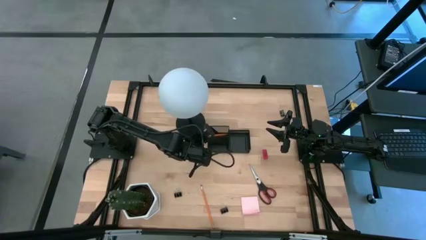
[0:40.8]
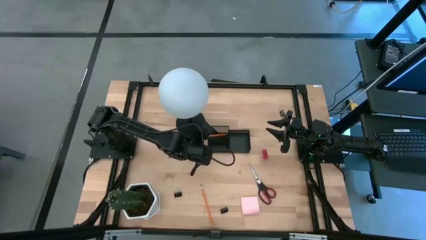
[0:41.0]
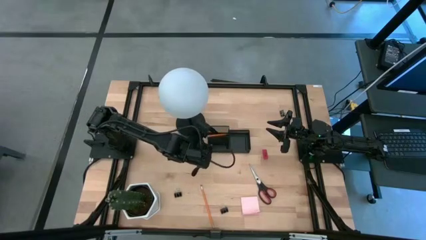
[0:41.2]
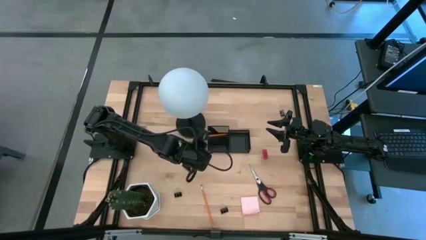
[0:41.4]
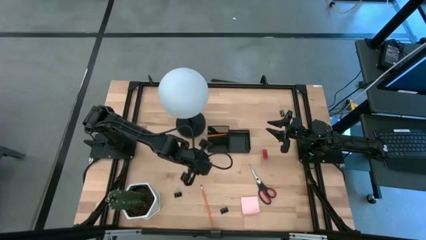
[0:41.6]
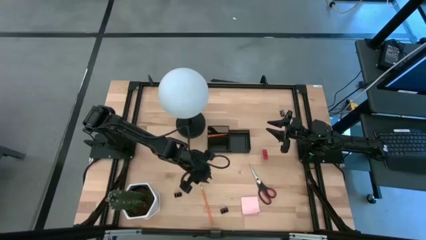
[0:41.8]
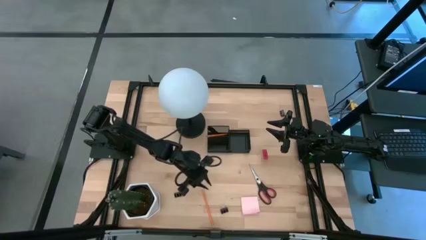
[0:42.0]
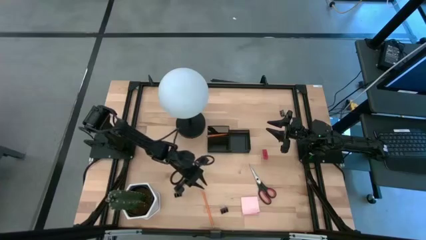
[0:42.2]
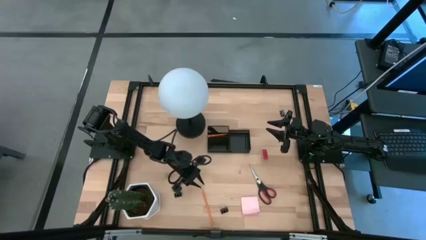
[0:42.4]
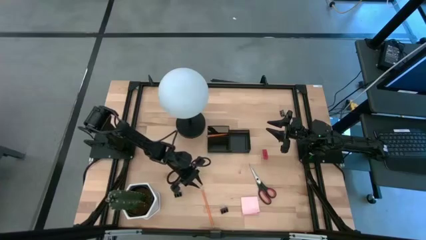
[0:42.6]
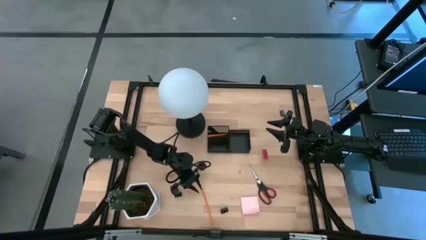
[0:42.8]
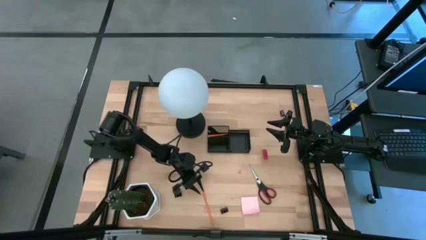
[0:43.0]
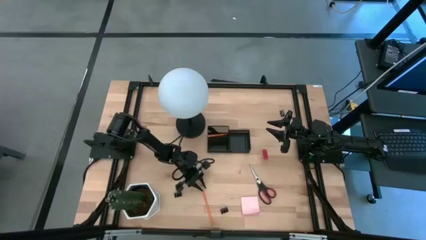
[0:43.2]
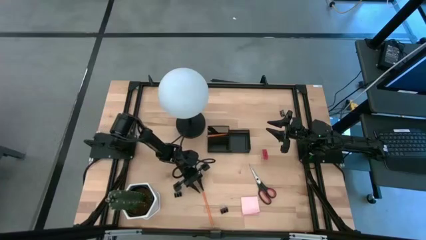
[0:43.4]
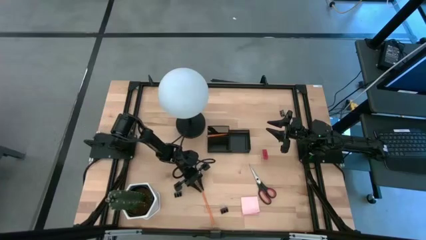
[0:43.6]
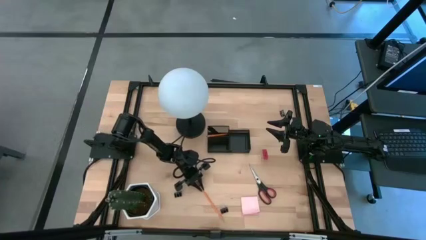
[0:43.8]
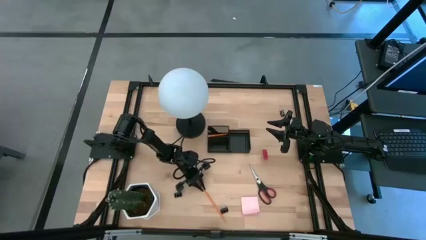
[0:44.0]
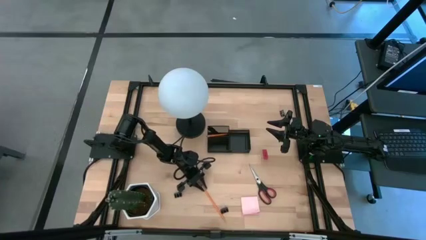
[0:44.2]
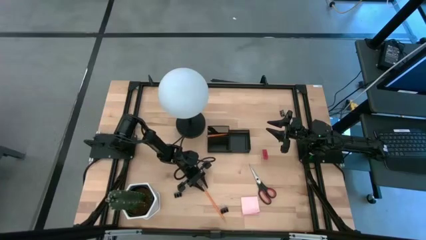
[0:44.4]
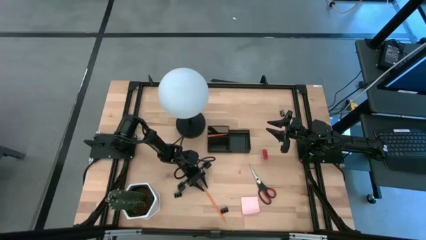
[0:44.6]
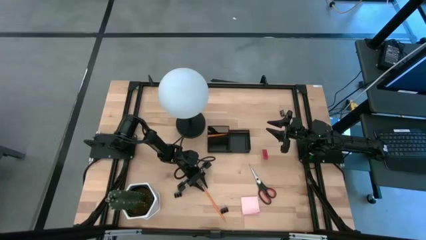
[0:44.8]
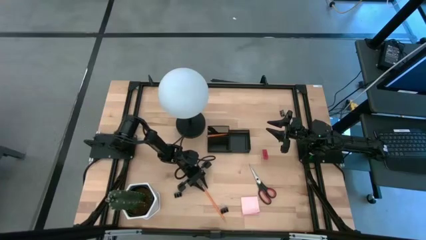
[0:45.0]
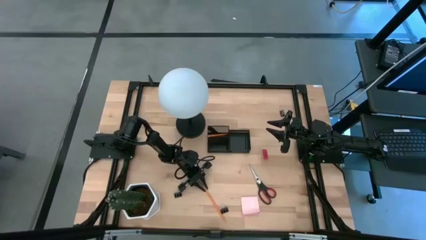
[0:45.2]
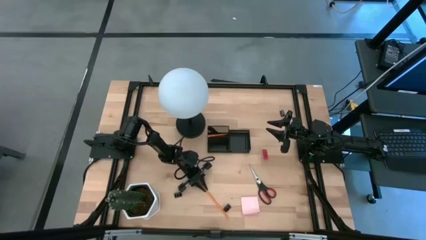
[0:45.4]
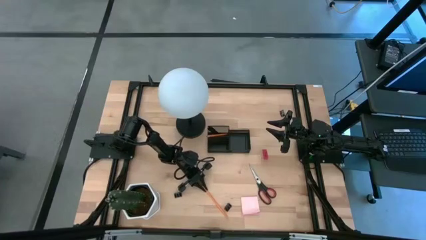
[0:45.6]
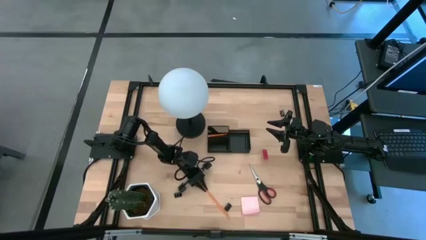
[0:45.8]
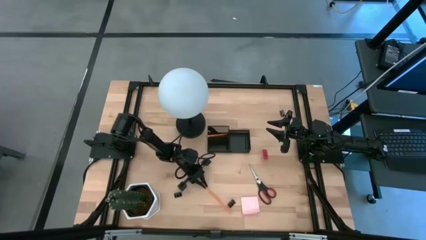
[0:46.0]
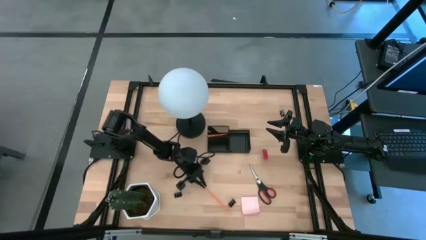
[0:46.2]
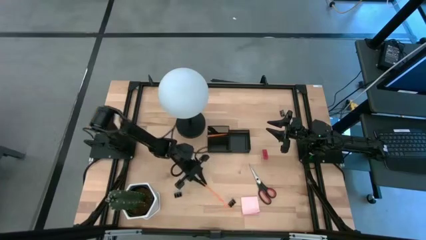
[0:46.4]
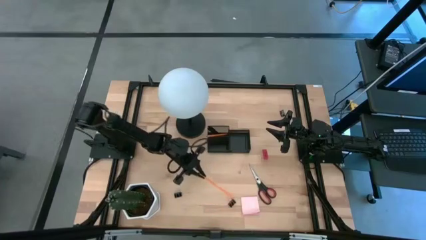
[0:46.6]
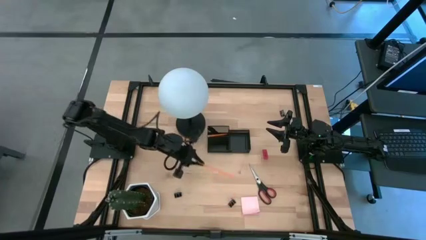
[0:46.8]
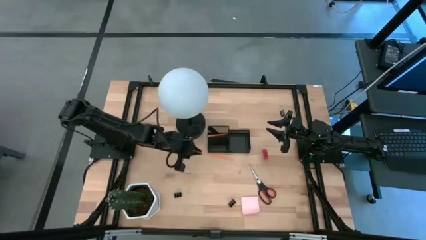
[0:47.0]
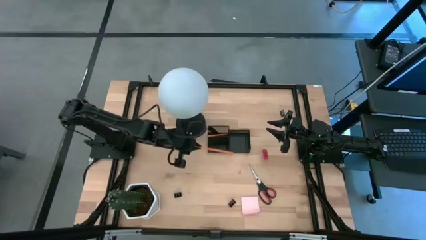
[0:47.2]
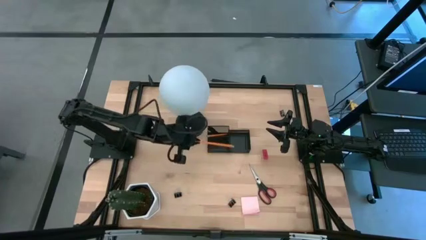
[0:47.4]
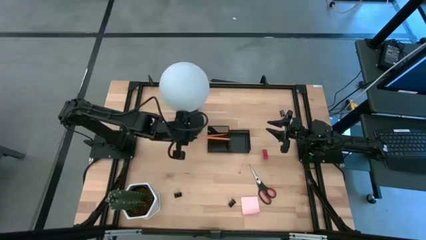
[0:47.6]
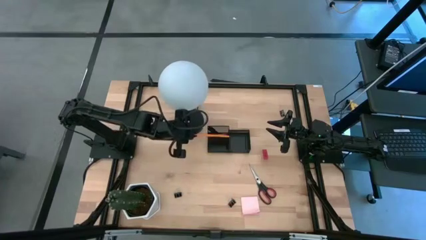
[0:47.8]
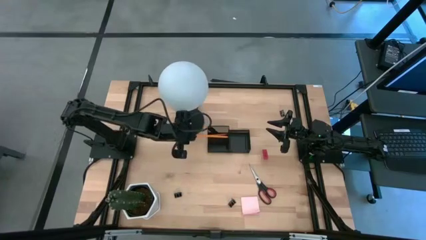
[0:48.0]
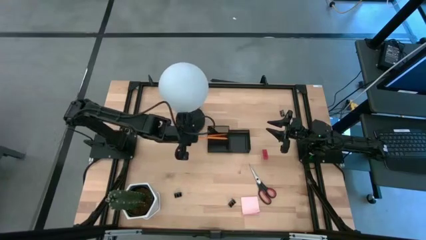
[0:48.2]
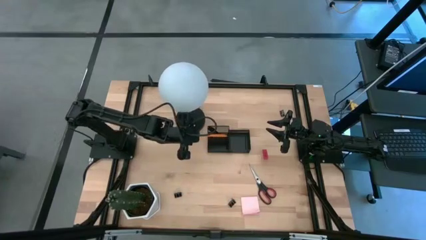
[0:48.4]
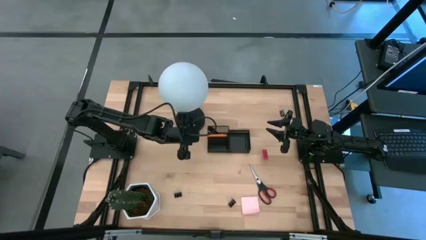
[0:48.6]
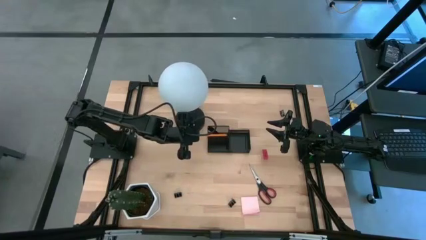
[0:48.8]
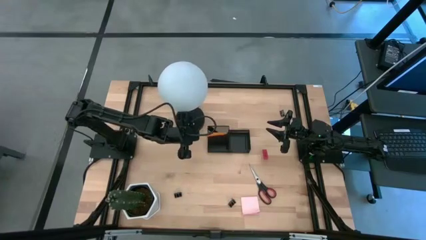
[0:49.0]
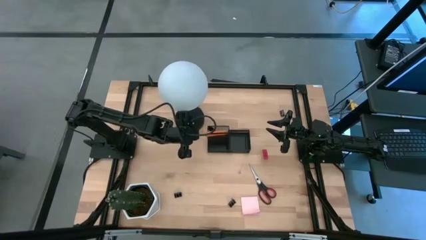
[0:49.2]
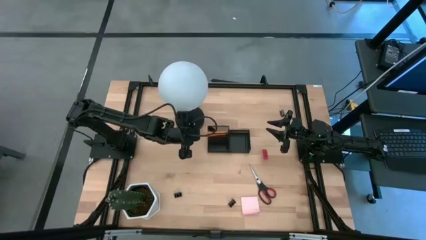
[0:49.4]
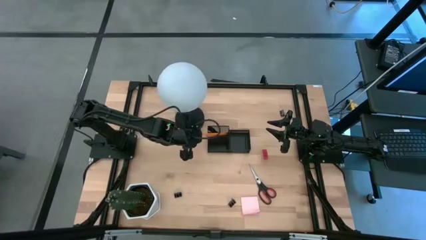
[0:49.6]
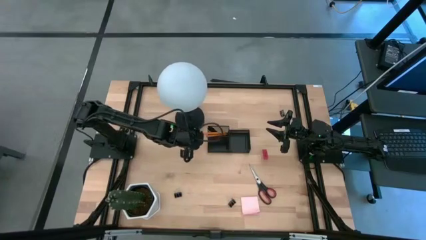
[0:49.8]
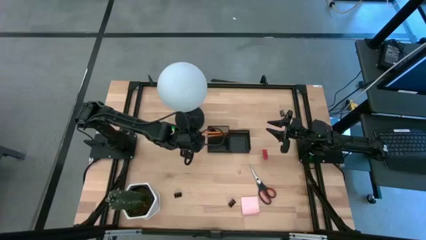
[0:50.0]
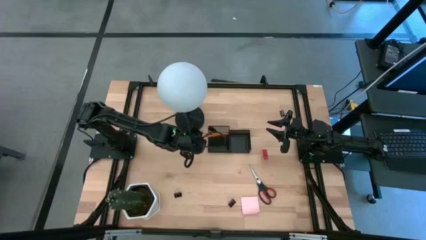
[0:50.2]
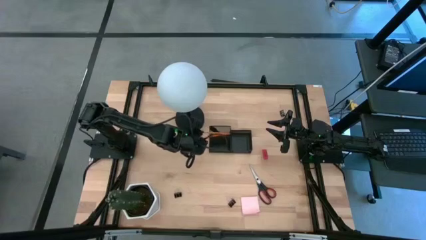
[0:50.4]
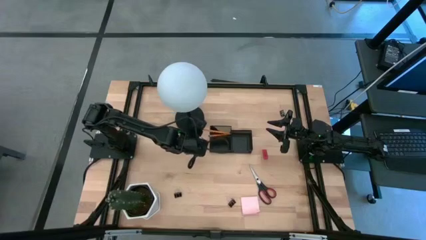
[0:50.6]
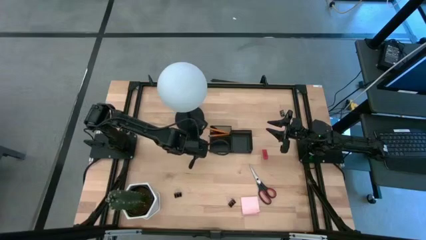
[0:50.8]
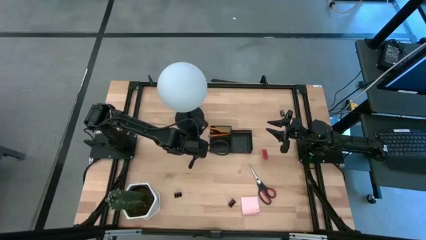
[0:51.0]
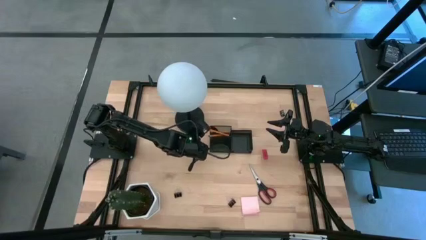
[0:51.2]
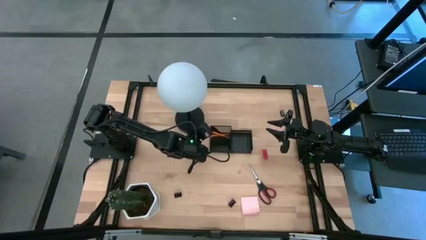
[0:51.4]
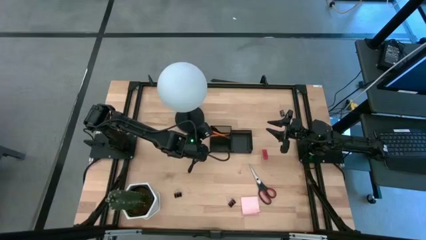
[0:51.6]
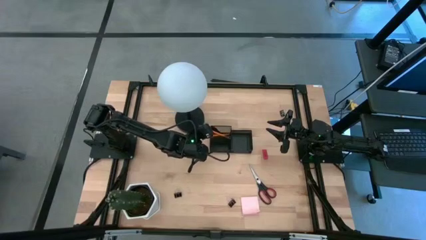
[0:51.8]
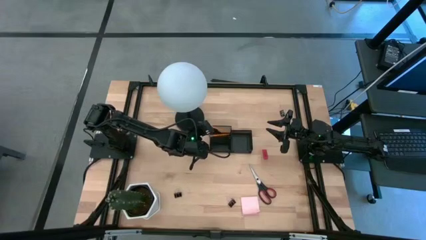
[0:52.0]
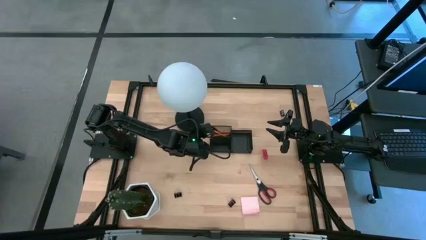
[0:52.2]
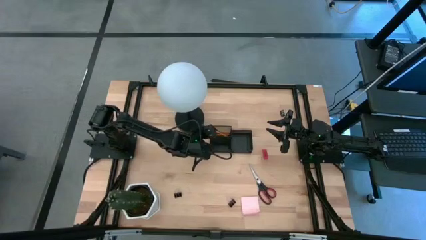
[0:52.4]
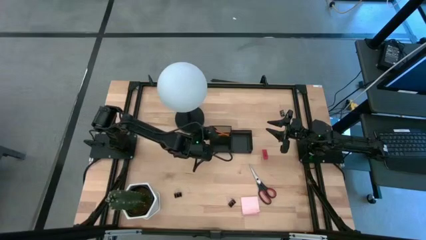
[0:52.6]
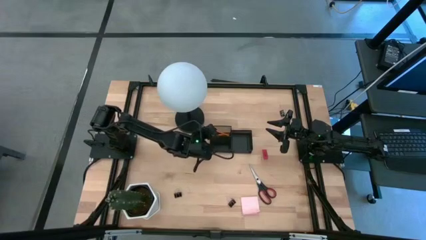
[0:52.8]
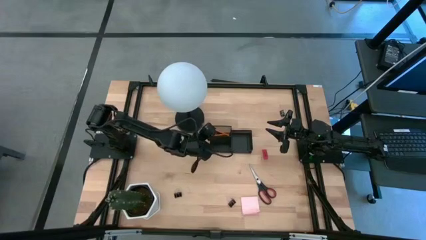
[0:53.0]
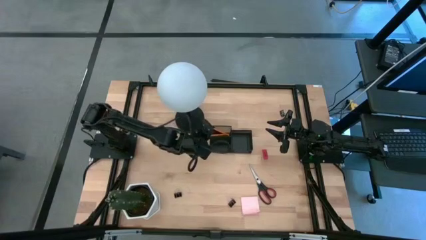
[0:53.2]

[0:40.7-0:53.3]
Task: Pick and place office supplies into organizer
Put the orange pencil into the black desk organizer

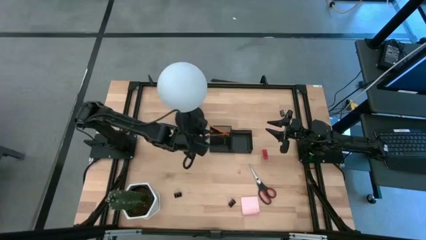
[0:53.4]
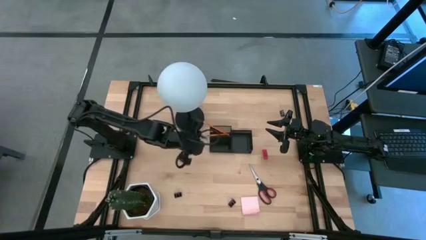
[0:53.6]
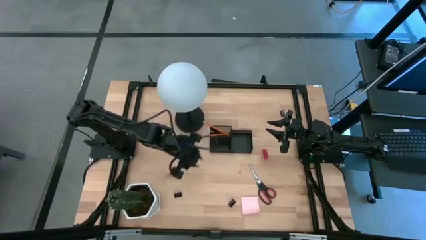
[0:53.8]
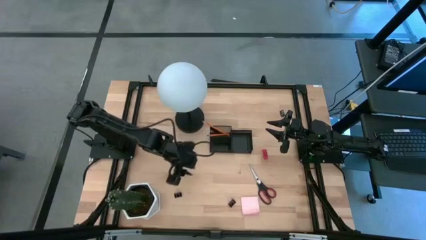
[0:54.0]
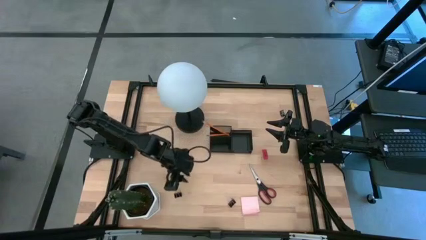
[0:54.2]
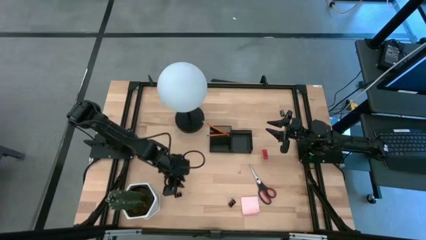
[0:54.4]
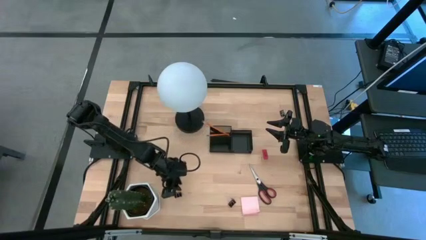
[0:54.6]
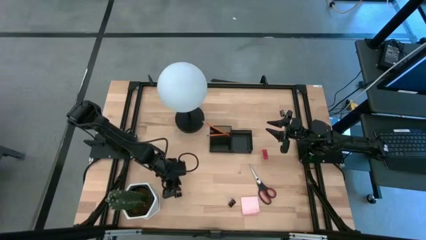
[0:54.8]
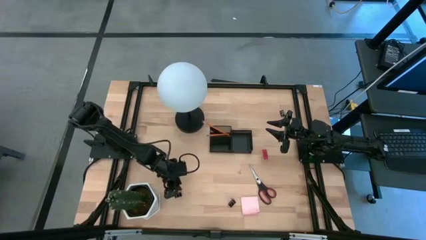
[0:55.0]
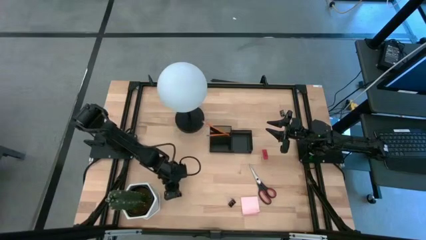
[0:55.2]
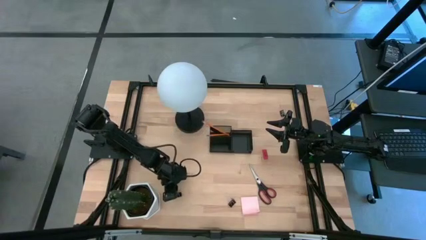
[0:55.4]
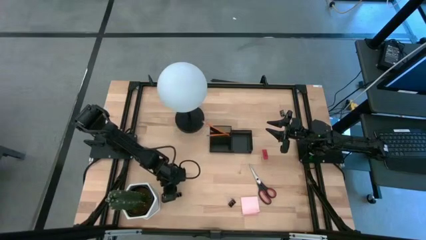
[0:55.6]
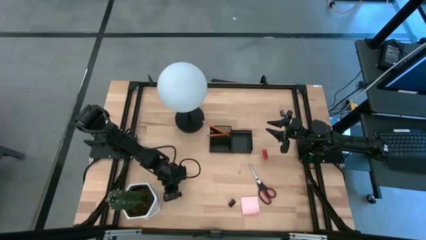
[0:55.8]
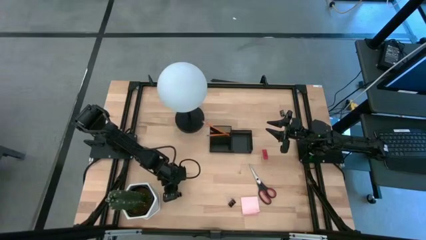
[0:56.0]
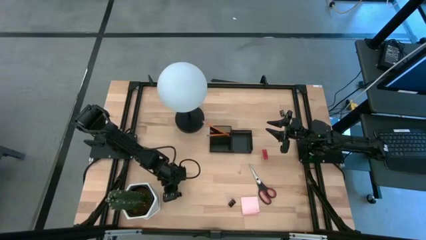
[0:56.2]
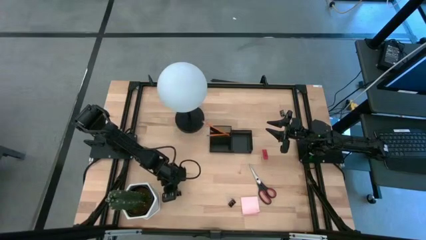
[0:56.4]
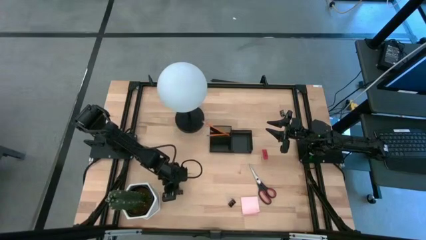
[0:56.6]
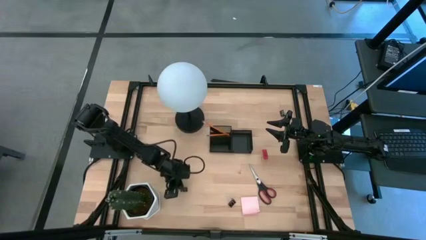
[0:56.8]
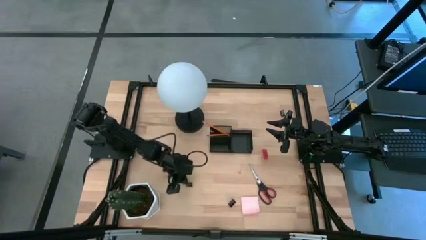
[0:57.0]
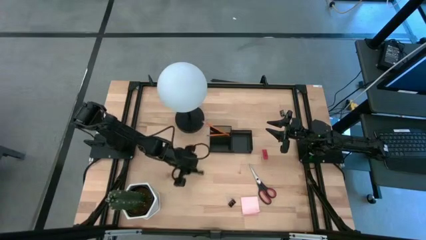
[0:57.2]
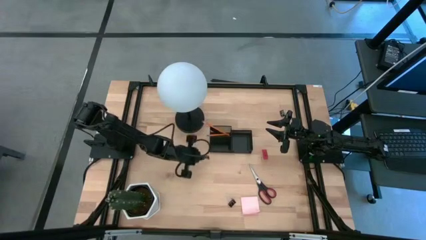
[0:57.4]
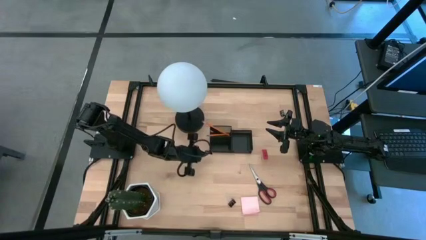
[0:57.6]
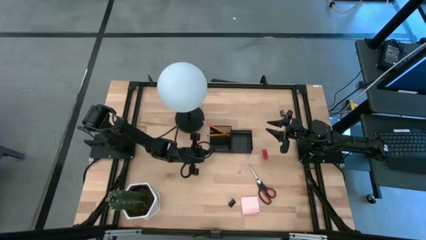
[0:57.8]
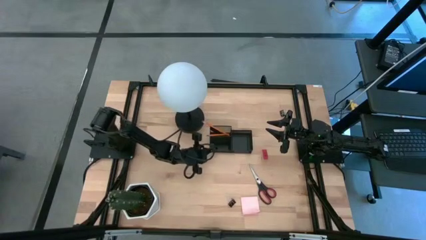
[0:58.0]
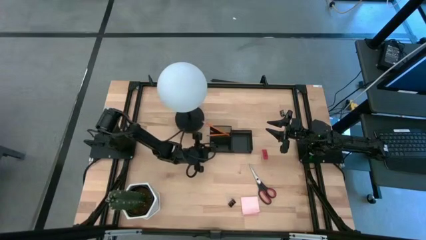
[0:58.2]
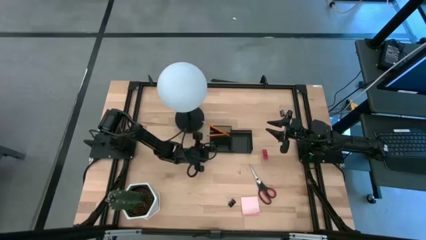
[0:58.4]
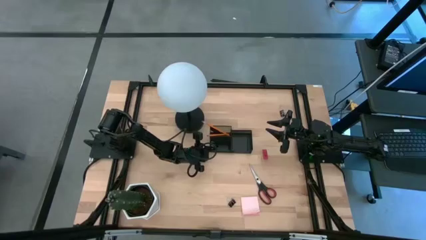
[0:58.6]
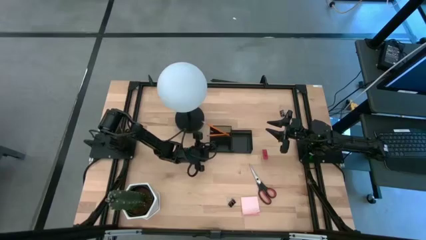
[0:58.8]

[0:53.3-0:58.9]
Put the bottom left black binder clip into the black desk organizer
